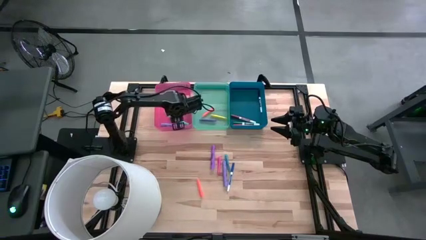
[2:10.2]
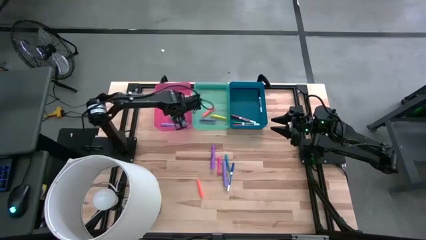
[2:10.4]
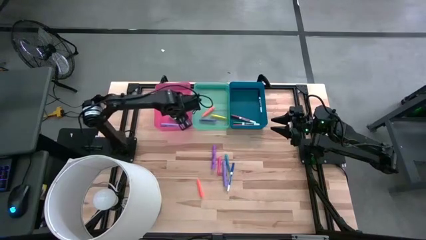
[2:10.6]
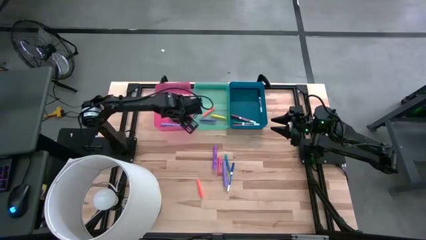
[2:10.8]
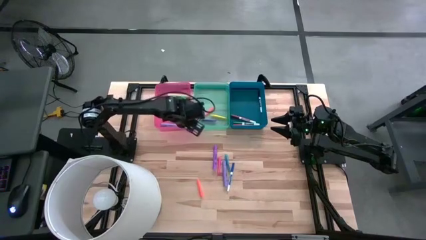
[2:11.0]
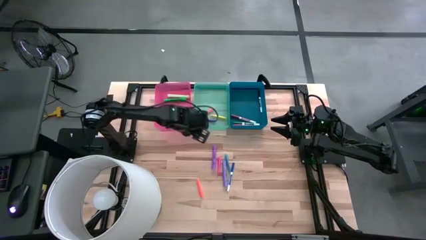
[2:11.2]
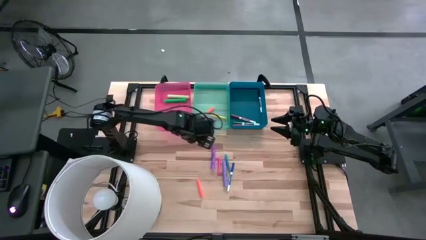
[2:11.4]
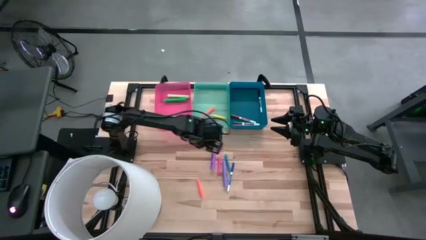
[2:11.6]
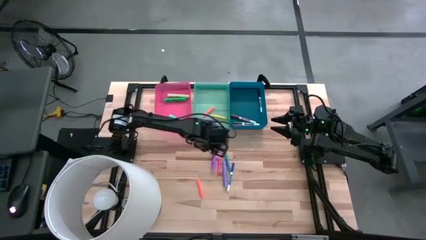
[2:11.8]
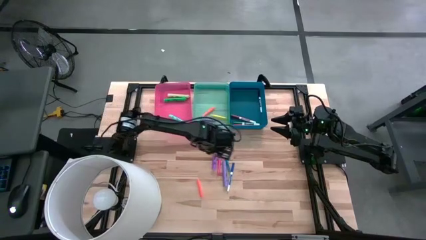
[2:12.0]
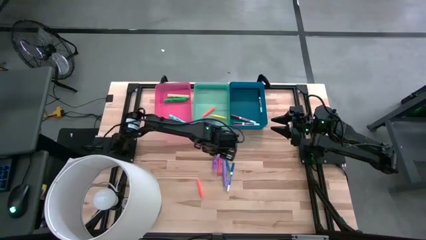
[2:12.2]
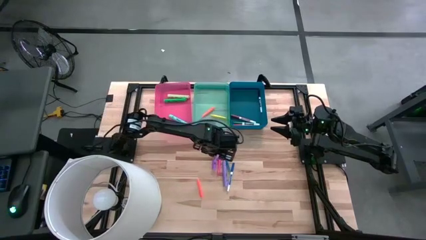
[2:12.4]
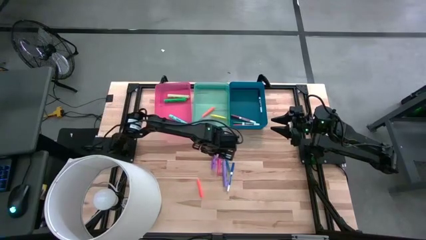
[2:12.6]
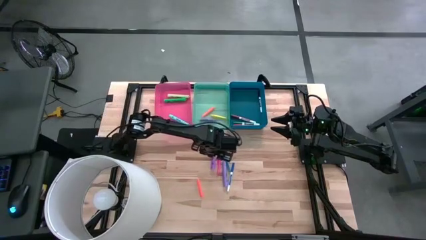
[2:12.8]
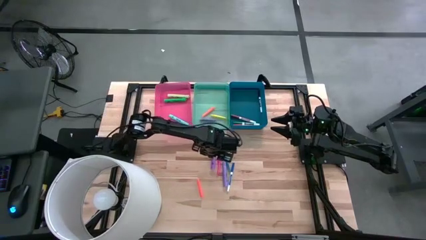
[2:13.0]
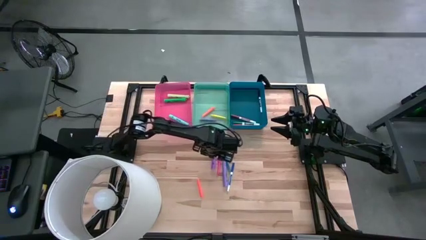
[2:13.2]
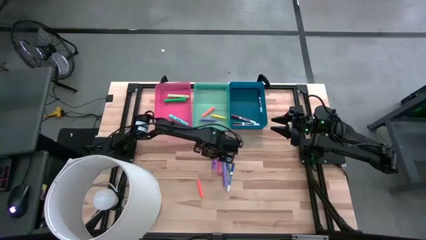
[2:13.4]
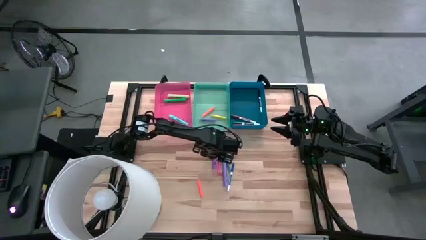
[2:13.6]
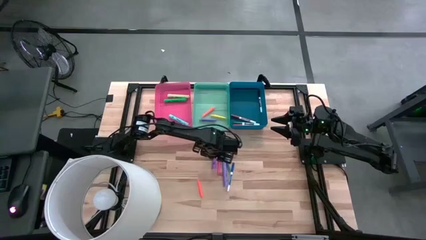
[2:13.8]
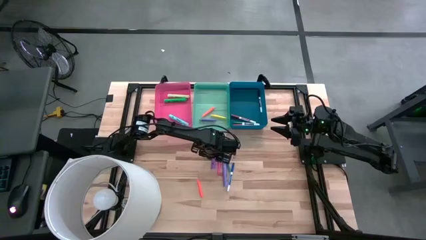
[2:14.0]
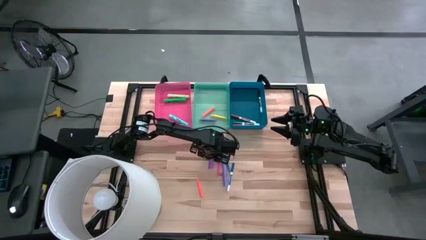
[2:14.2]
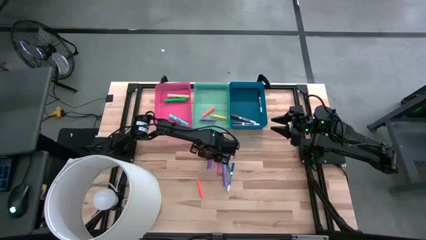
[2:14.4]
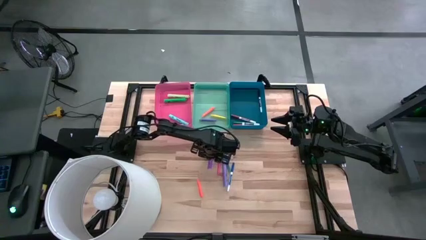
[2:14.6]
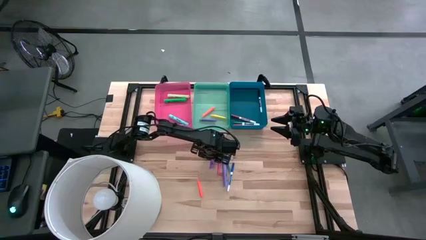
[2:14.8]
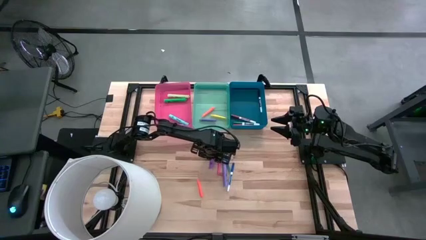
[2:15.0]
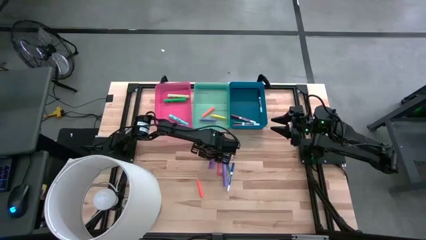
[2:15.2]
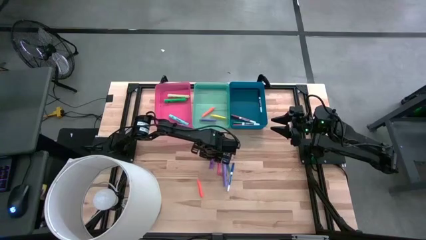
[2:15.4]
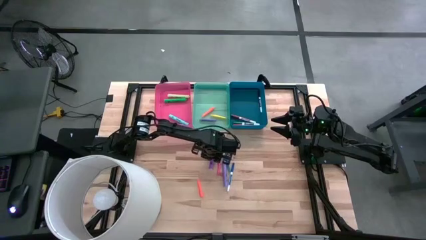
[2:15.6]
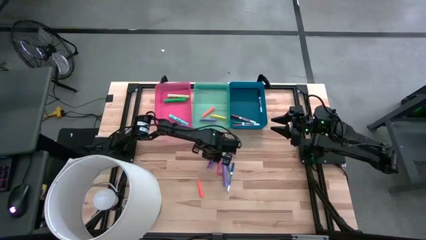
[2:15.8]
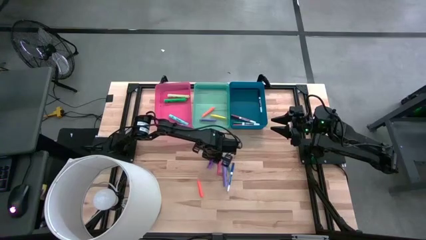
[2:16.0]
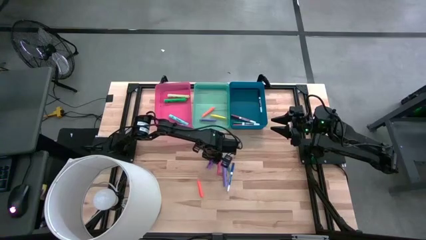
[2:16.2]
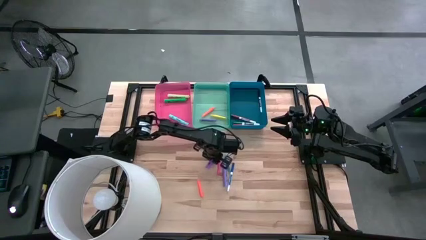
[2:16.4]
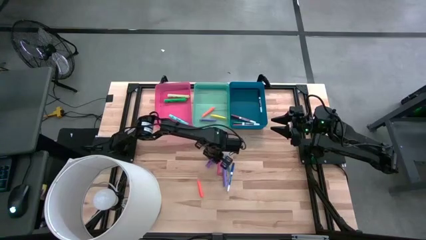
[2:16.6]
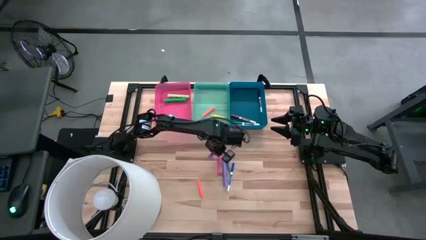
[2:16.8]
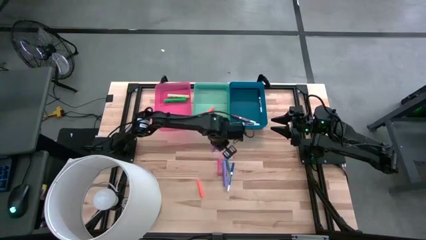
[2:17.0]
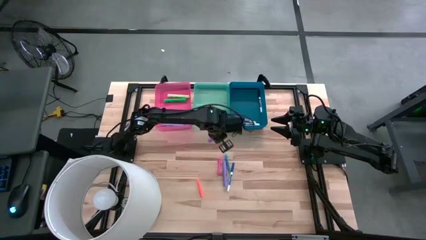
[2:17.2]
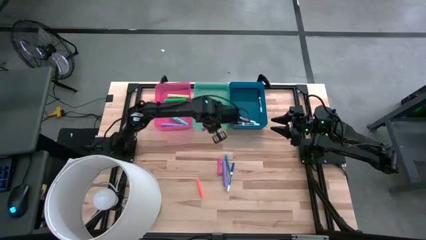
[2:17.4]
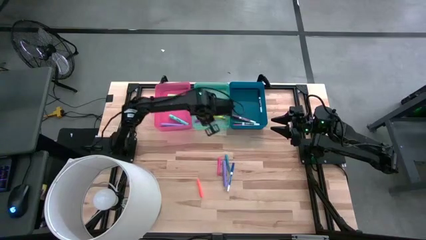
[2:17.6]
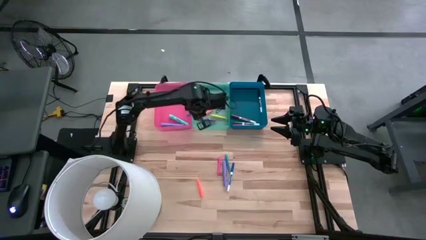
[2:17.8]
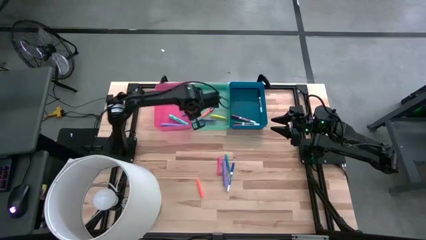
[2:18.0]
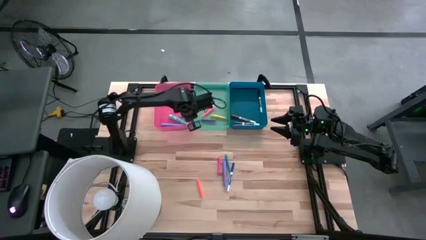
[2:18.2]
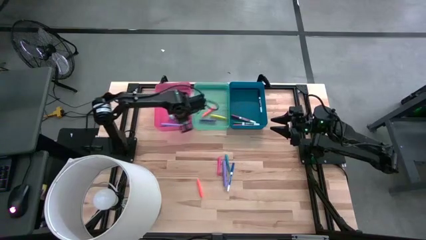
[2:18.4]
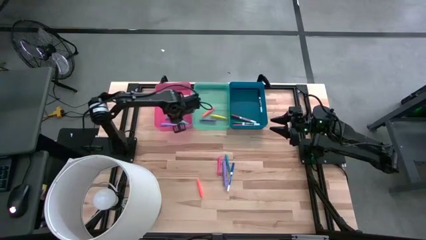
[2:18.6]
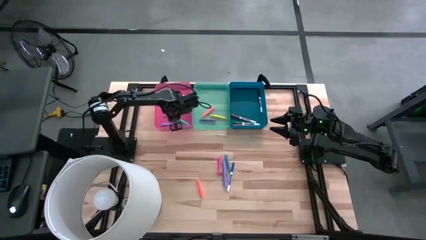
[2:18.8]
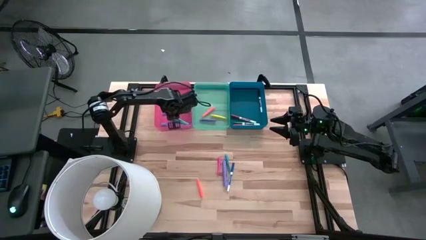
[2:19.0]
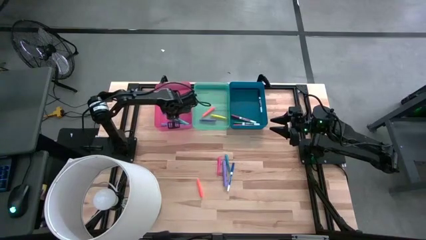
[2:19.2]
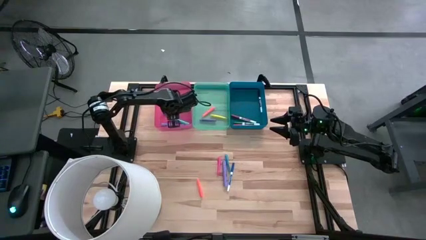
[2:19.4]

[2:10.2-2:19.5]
Task: Pick & Place Markers
Put the purple marker into the red bin

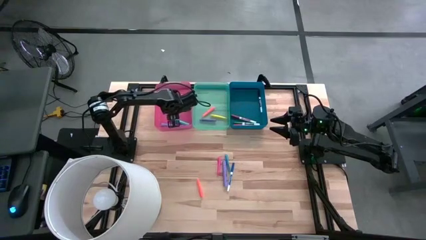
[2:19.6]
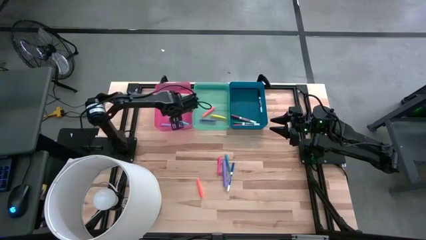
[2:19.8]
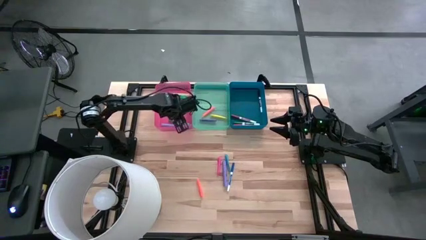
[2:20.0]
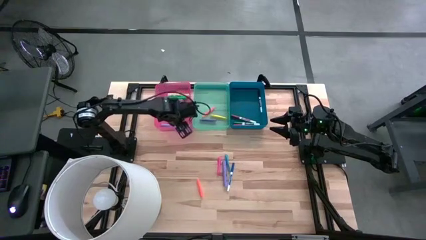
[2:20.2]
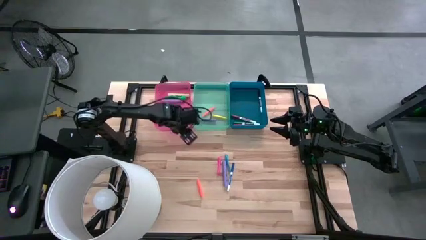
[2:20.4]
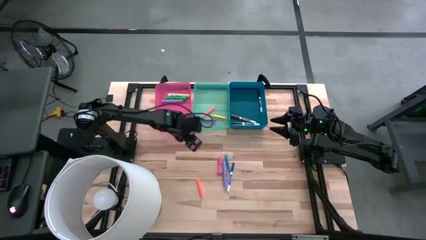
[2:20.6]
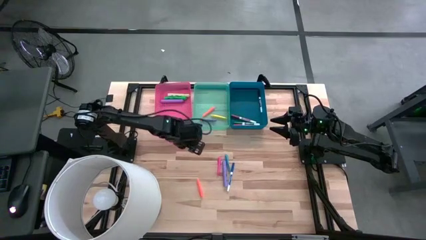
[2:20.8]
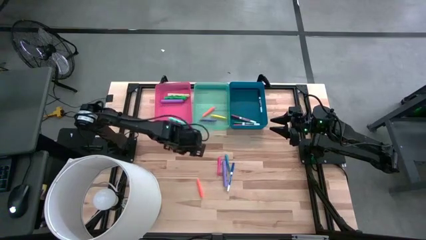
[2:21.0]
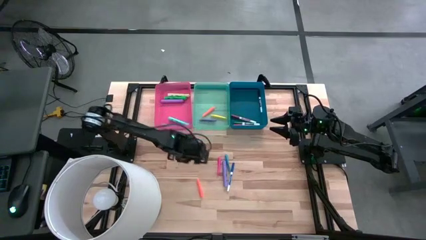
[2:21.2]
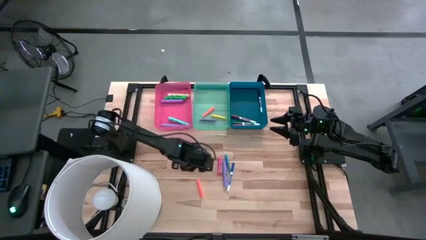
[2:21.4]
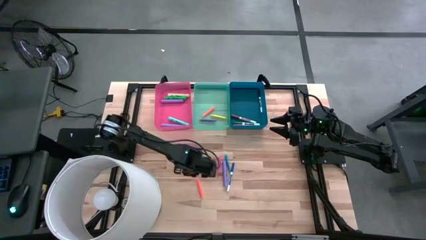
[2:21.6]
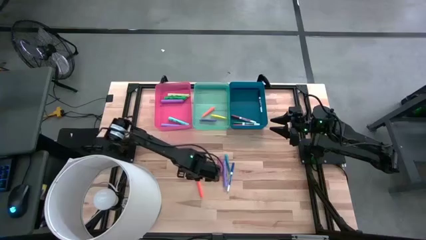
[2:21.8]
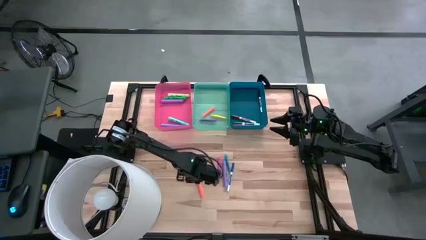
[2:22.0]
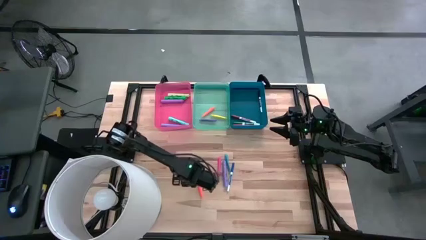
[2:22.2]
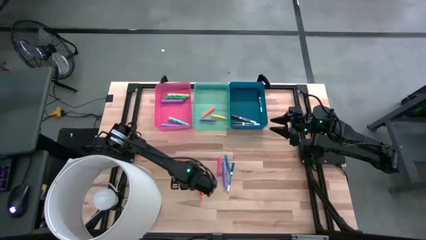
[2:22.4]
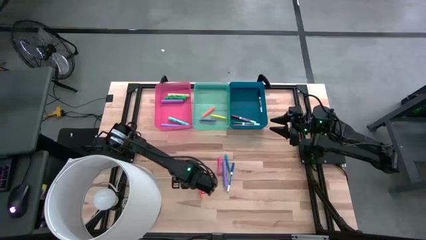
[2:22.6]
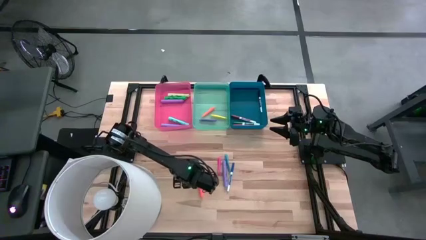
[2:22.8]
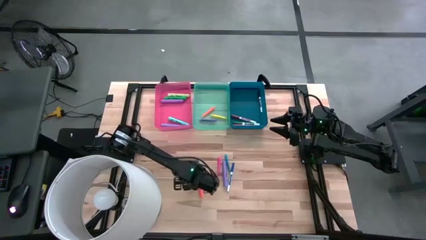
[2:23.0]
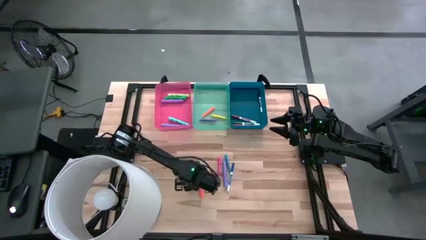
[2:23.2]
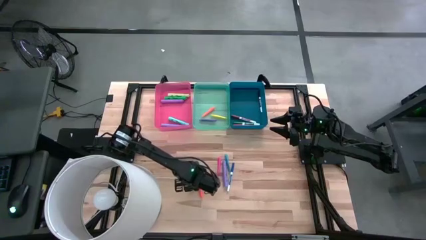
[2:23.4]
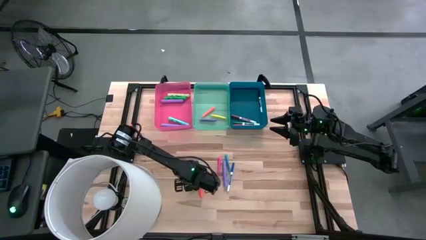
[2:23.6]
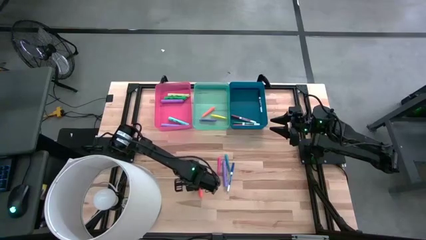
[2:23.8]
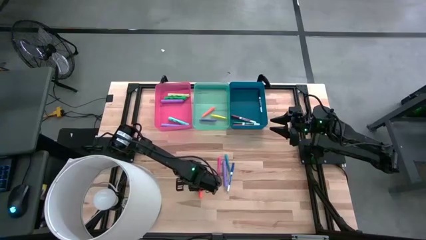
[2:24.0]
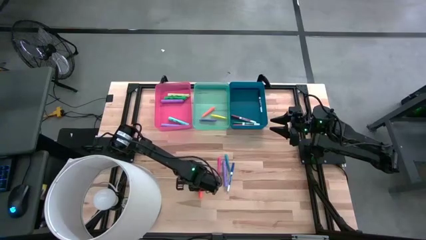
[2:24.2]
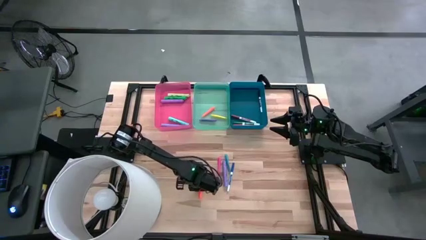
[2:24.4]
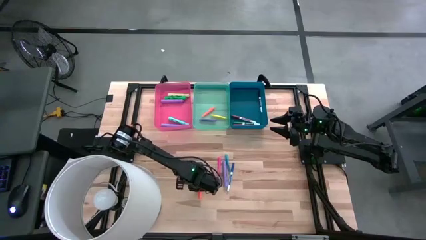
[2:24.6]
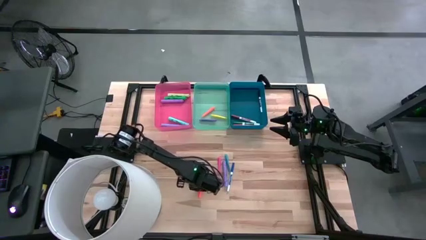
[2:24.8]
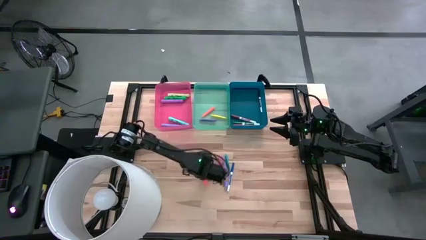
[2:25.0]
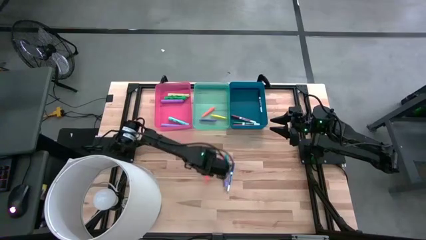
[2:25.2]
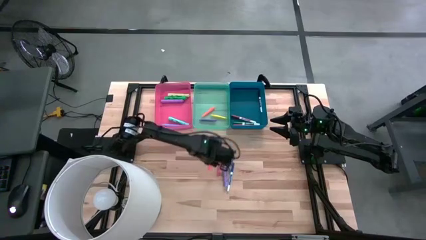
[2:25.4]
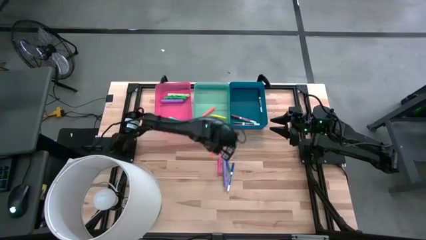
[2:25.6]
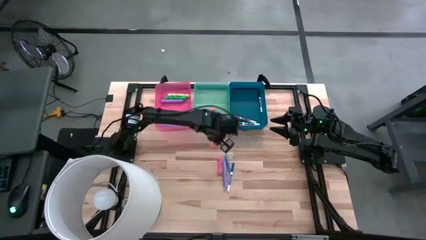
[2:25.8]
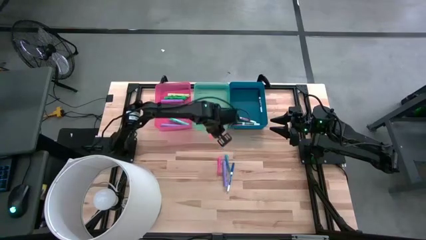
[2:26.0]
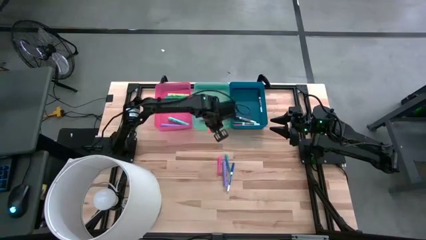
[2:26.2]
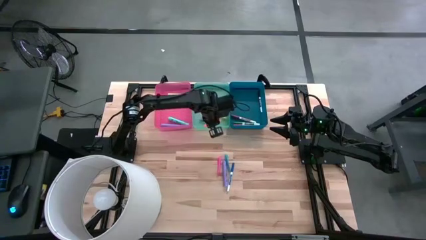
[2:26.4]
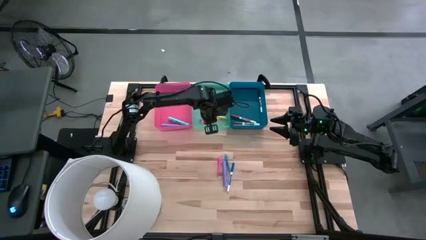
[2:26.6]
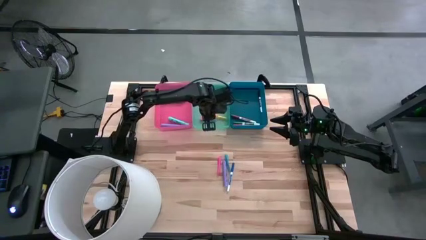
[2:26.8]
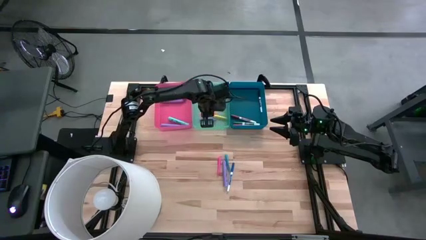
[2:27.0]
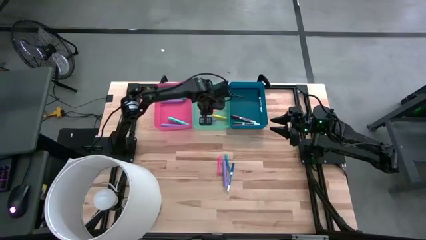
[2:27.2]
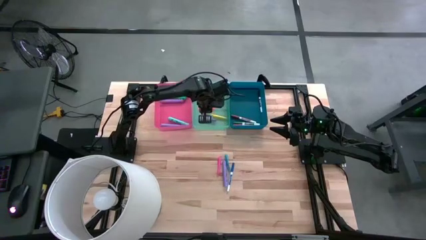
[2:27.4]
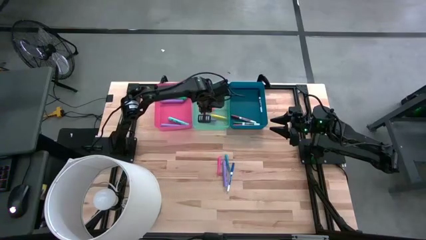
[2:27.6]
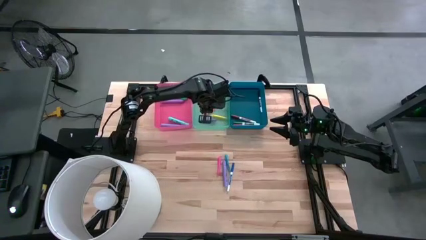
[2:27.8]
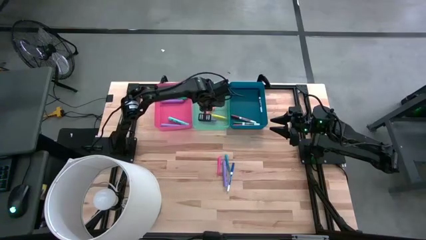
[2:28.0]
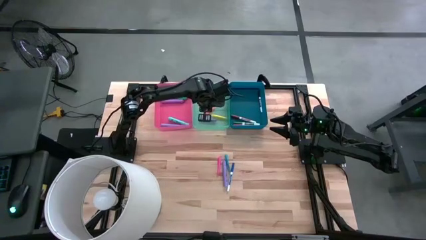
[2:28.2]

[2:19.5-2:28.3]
Put the orange pen into the green bin
